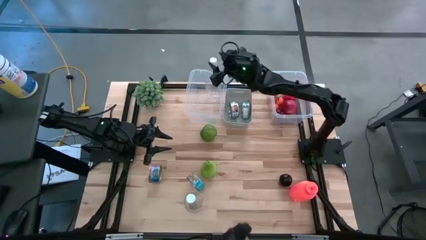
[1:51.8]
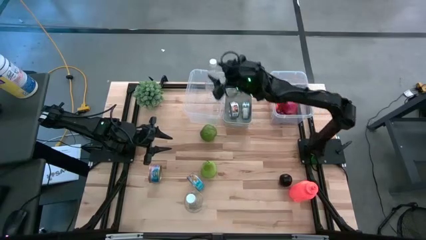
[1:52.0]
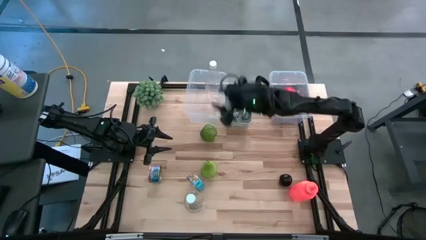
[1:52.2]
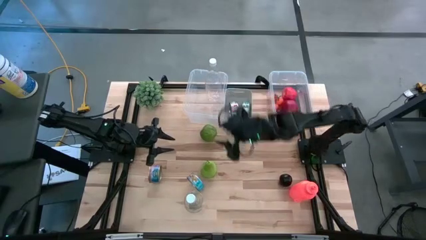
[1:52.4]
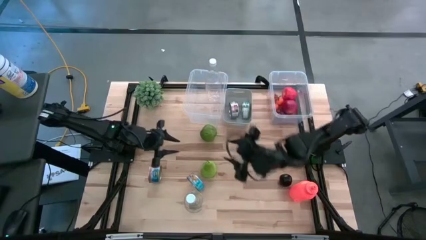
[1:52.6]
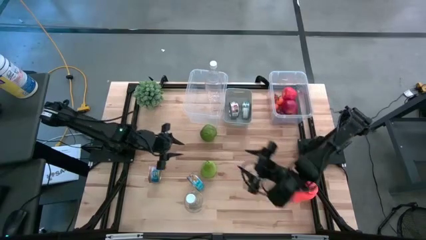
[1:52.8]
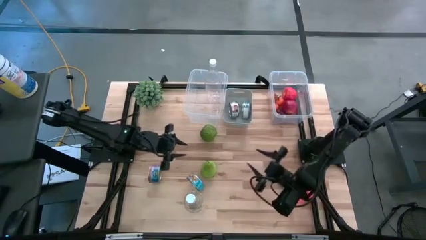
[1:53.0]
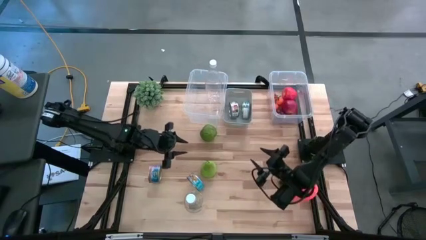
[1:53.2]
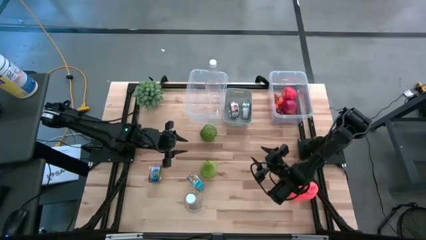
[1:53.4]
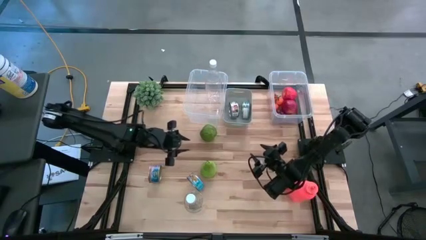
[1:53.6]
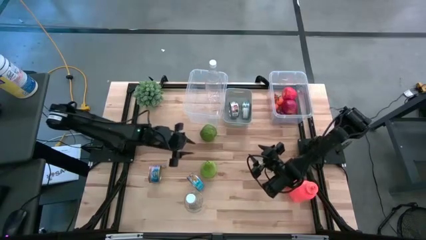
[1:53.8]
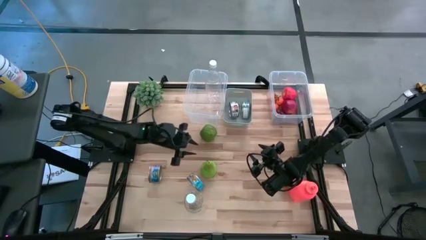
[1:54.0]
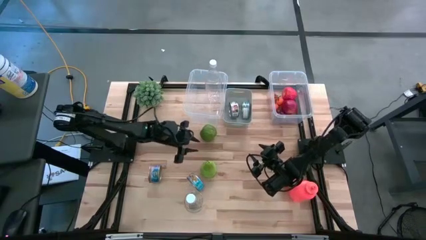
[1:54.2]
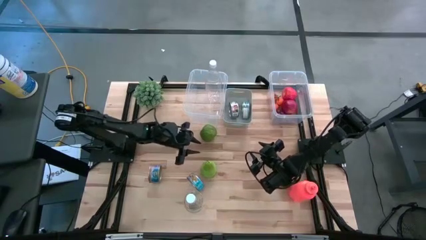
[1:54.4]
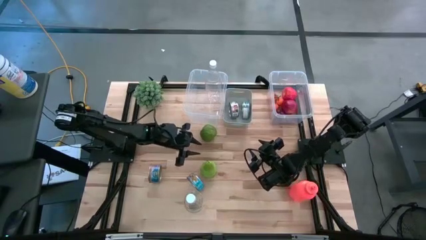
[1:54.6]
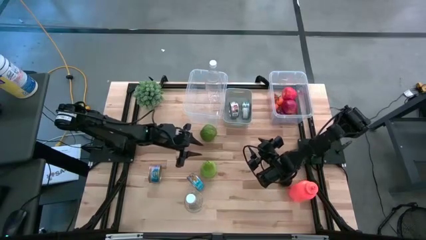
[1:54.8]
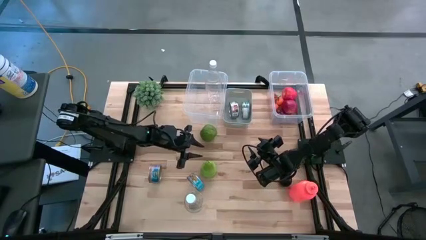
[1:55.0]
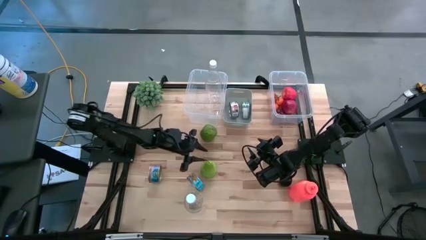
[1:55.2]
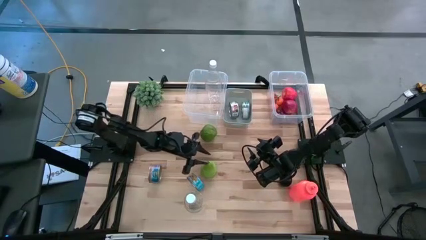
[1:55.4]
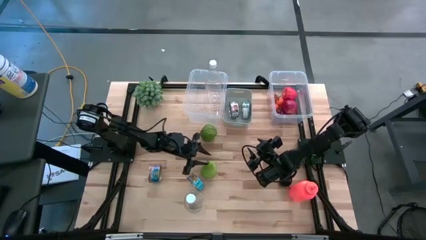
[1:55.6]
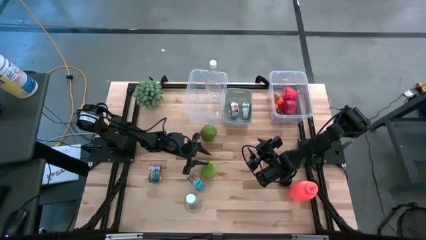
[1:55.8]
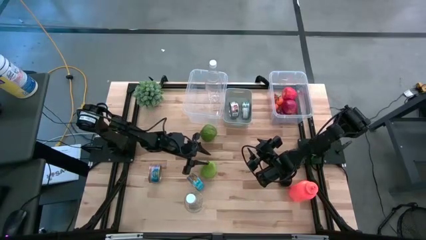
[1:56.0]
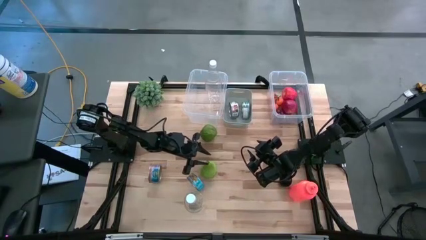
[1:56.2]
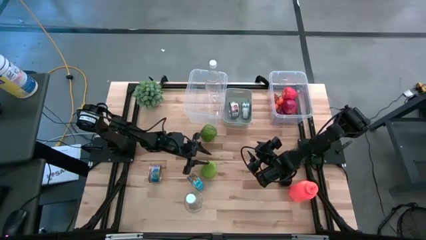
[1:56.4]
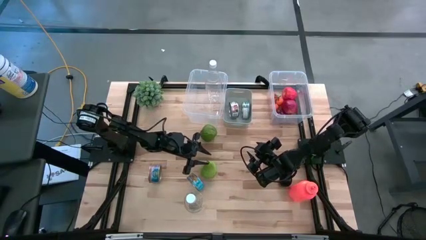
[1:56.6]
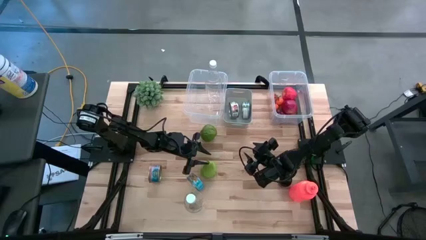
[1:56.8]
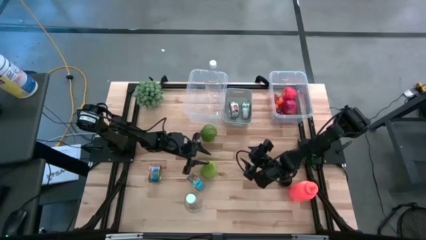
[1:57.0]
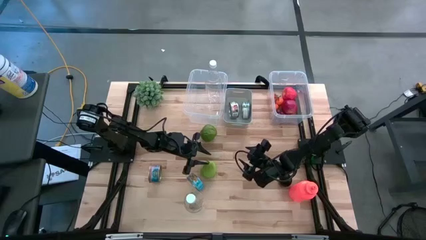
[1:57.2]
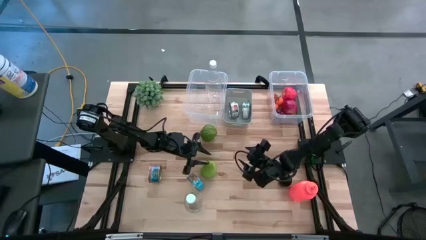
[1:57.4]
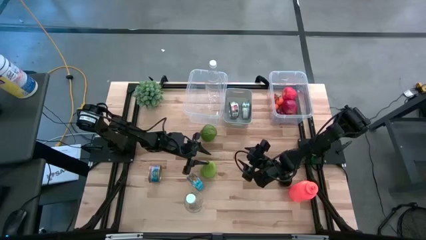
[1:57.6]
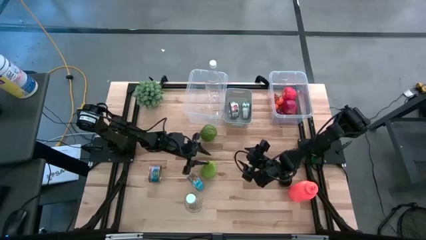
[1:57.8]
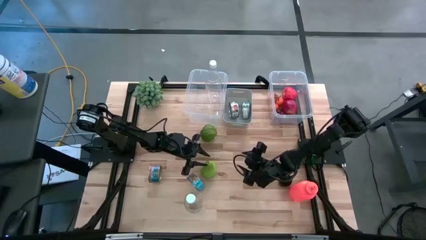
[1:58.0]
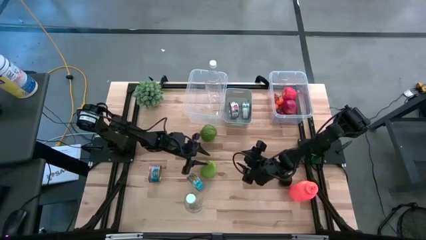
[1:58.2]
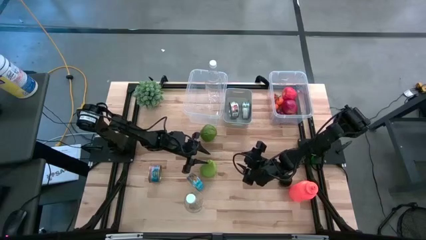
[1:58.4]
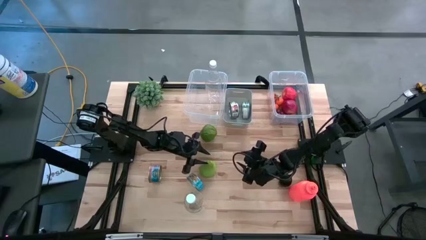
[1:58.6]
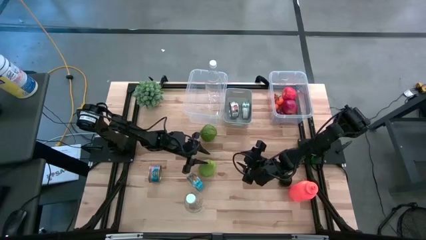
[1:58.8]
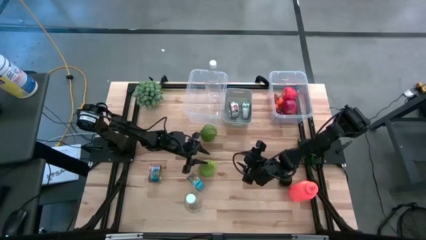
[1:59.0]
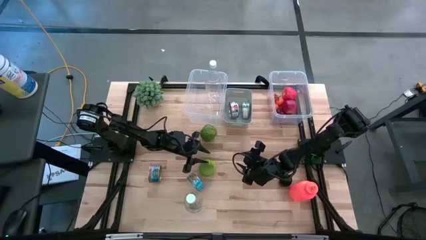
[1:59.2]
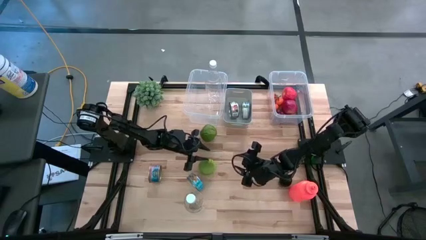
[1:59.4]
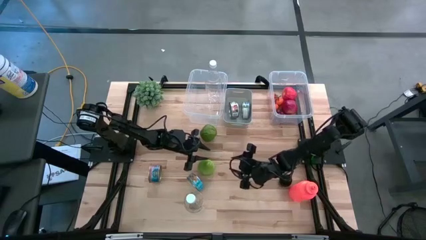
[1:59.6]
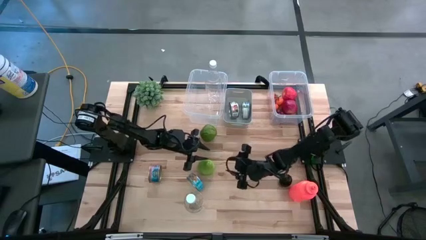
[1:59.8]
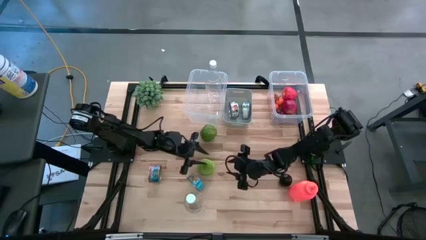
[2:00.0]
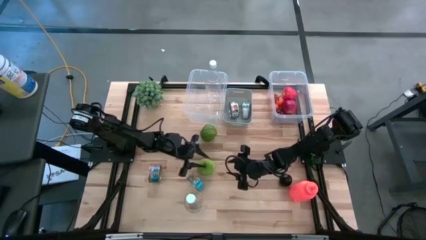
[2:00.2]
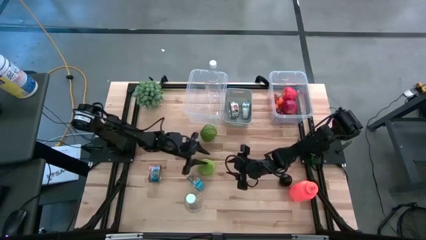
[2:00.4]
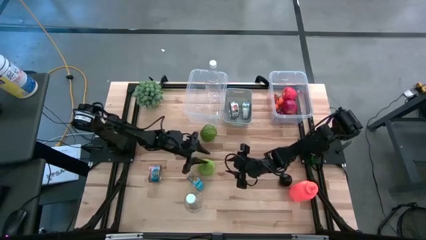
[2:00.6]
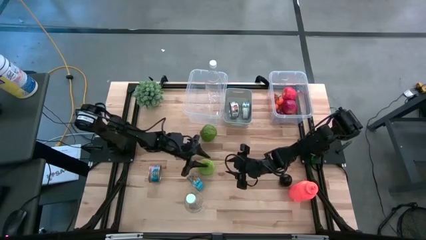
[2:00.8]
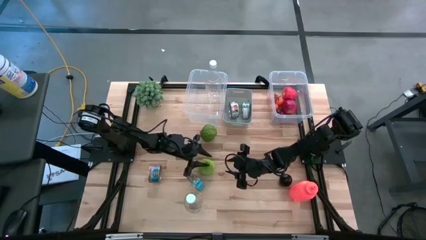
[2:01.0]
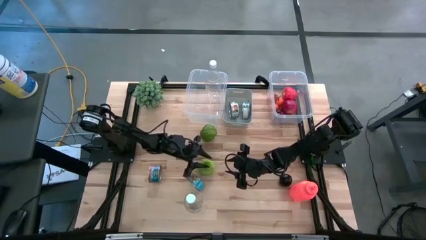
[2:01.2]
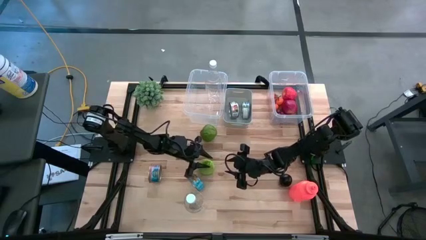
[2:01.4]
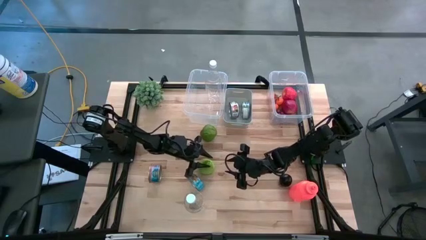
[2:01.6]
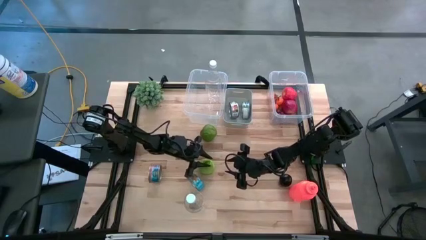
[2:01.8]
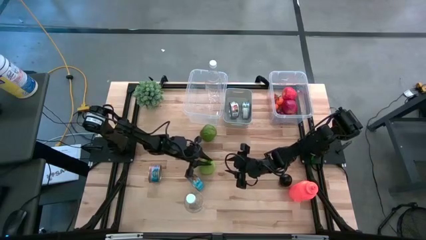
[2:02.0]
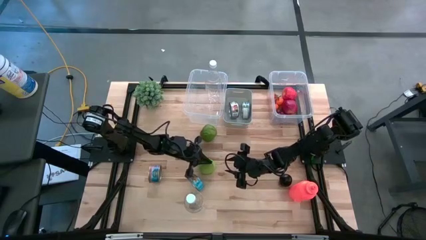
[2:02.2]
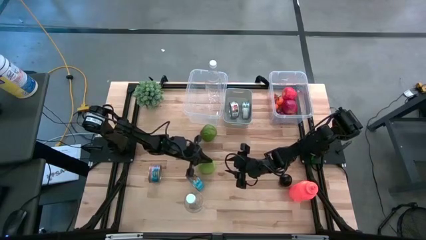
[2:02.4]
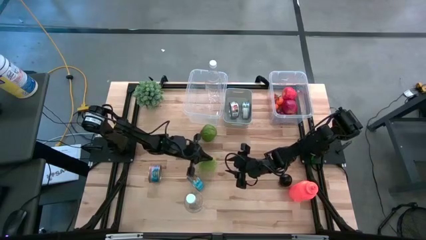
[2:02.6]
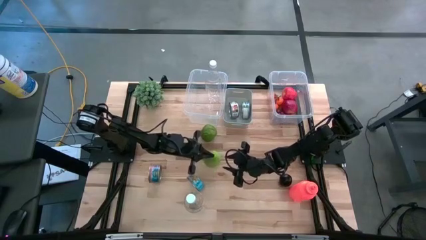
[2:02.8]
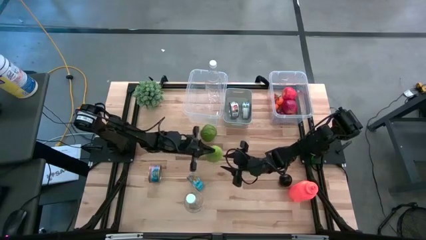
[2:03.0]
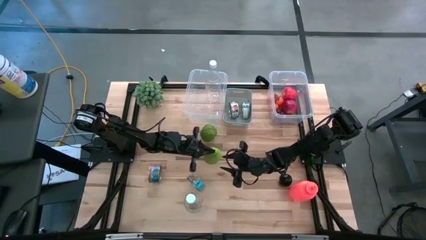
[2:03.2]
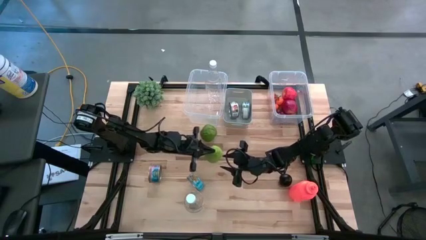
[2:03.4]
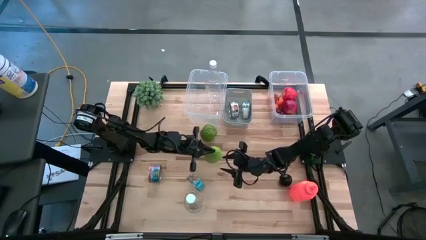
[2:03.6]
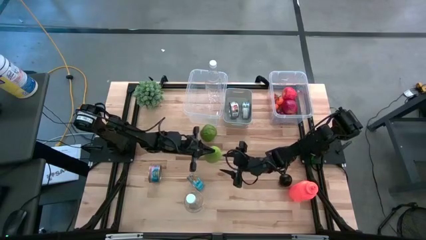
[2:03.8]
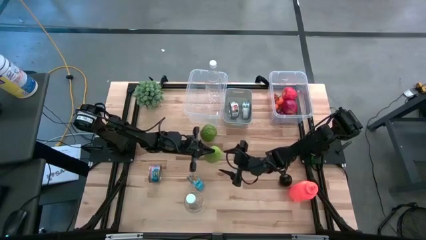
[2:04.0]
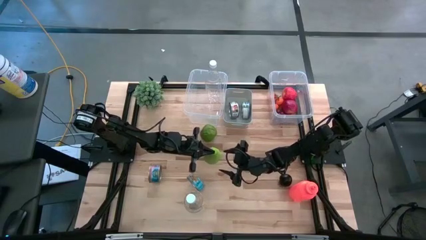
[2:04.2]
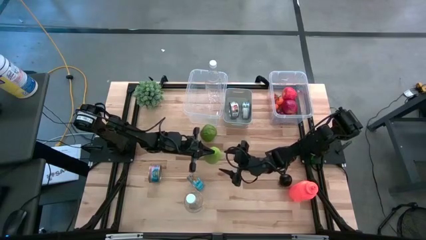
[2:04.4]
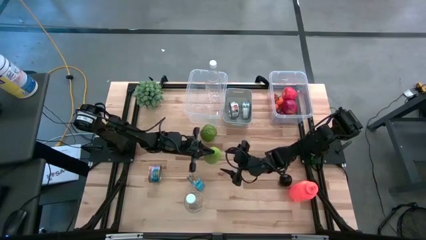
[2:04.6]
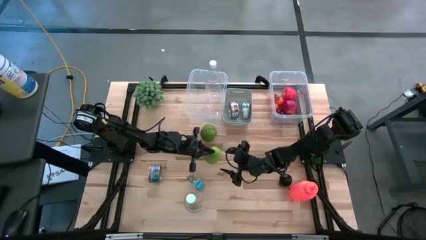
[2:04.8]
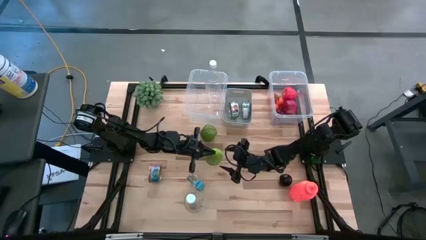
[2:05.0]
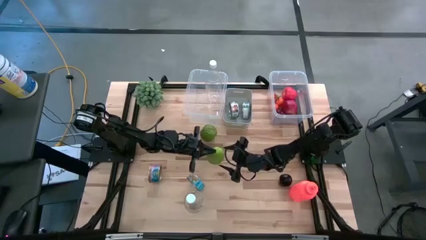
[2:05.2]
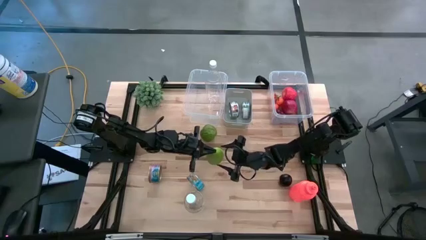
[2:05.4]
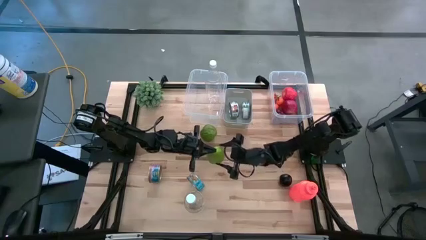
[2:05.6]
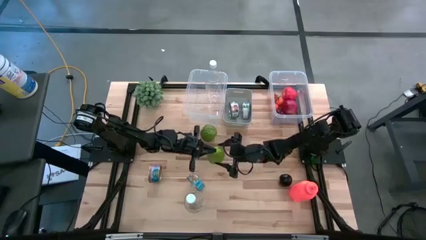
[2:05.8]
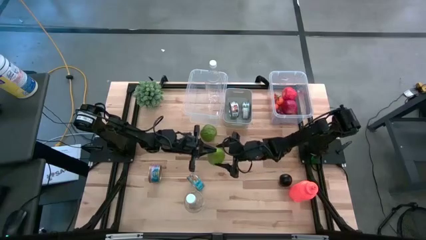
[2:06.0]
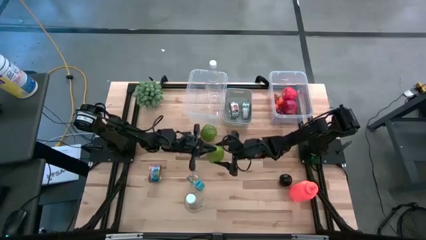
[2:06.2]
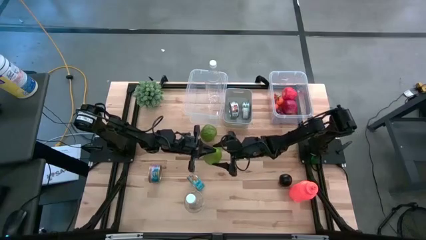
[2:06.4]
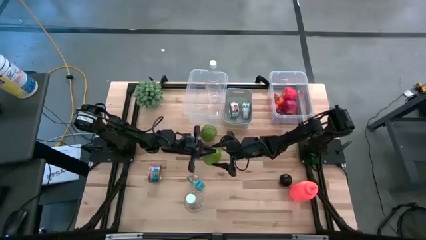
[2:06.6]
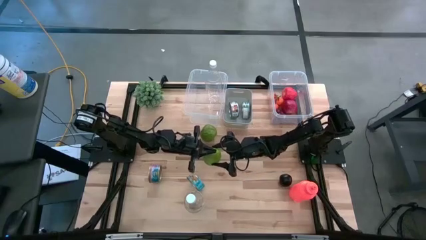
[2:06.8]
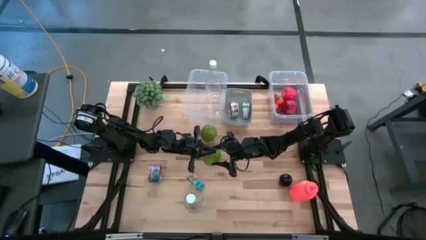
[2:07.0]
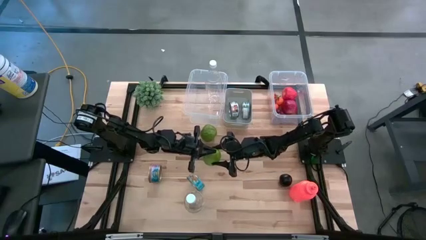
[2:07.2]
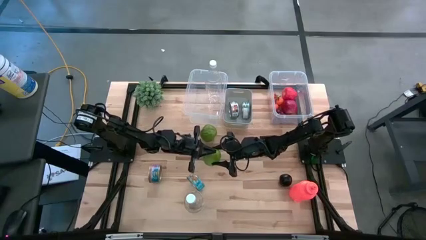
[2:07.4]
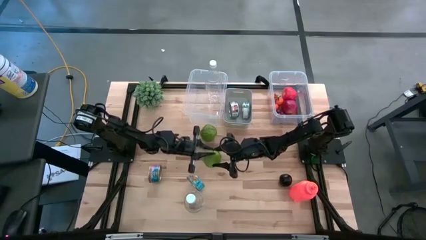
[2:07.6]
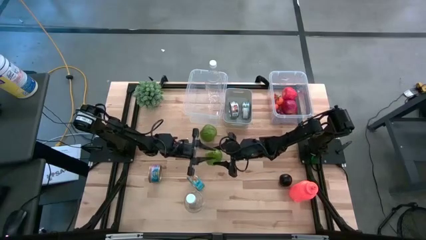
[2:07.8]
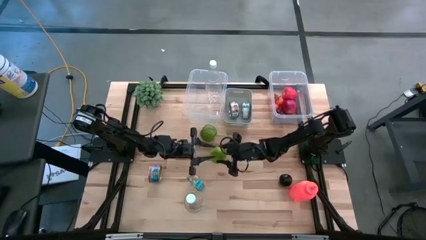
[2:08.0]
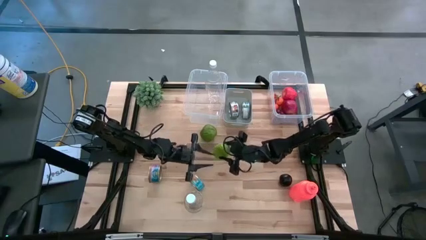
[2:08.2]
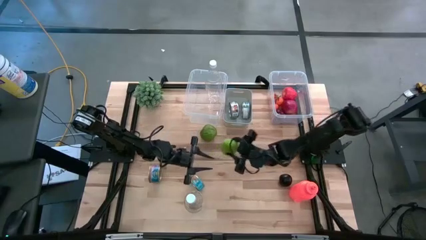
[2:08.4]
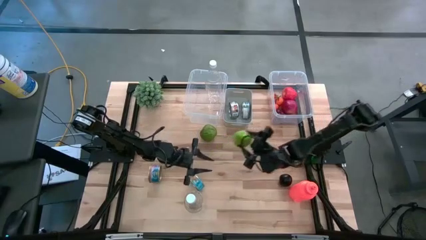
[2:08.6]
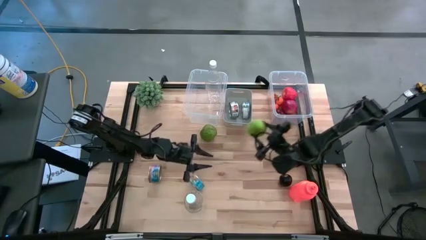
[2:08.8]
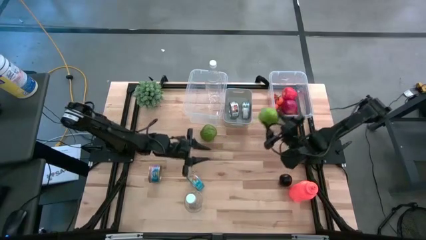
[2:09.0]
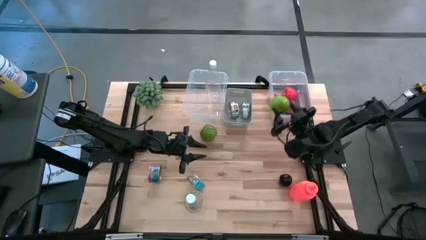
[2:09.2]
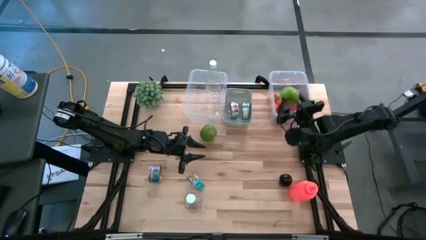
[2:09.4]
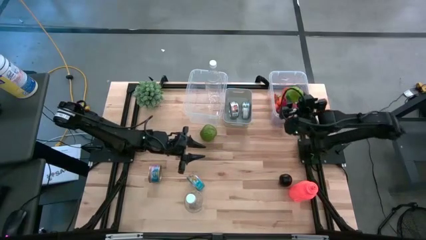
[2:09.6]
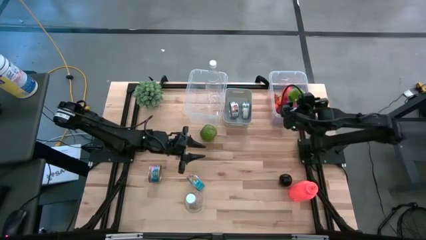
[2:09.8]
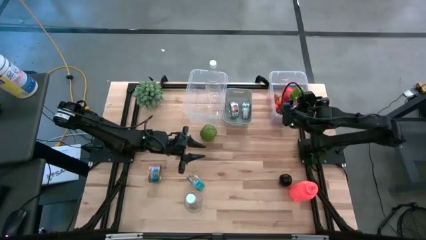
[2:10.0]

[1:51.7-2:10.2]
Task: Pick & Place Food Item
Put the pear into the right transparent bin
